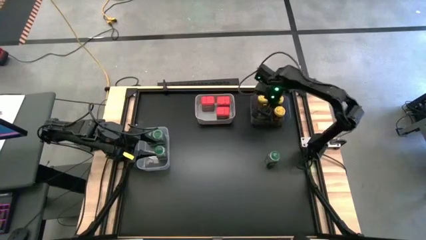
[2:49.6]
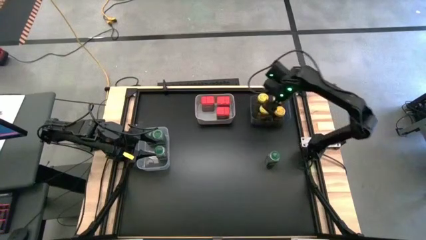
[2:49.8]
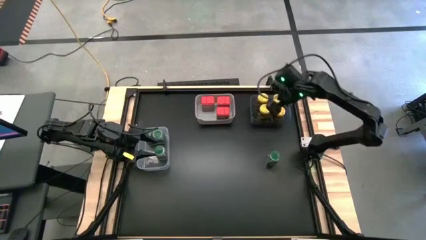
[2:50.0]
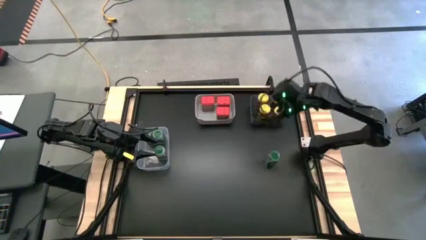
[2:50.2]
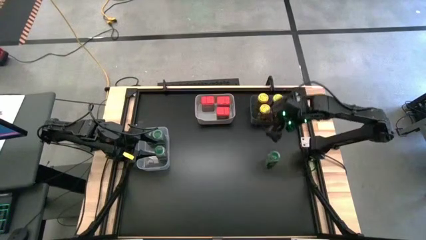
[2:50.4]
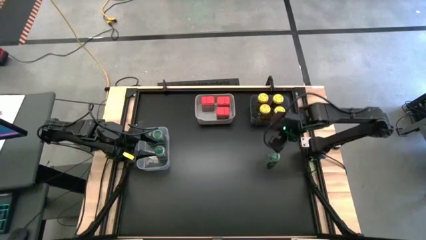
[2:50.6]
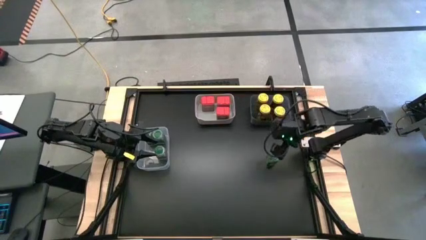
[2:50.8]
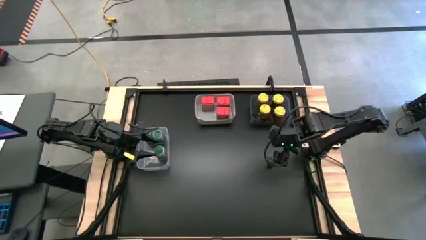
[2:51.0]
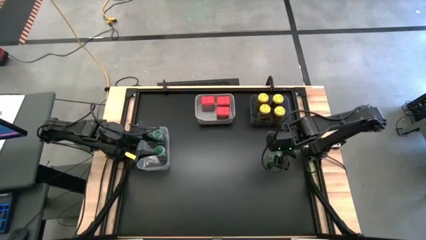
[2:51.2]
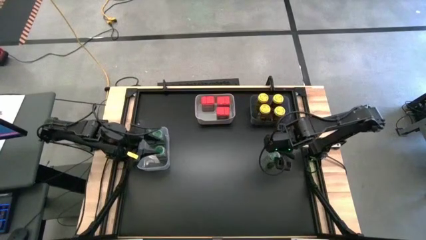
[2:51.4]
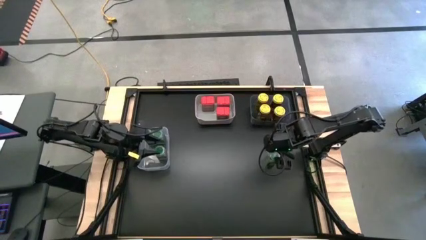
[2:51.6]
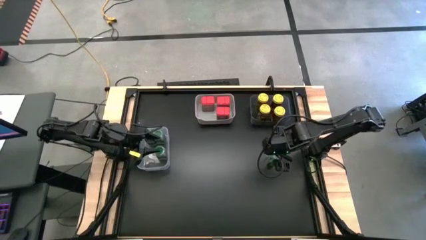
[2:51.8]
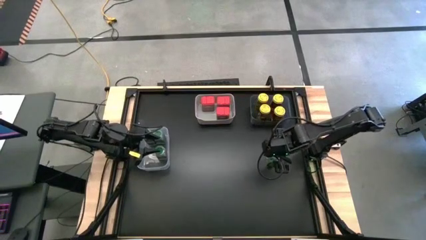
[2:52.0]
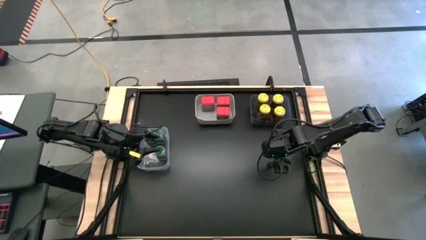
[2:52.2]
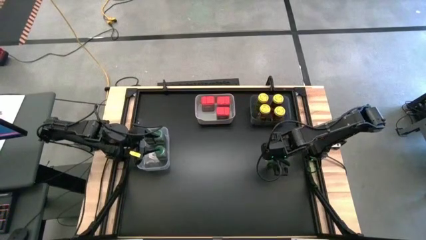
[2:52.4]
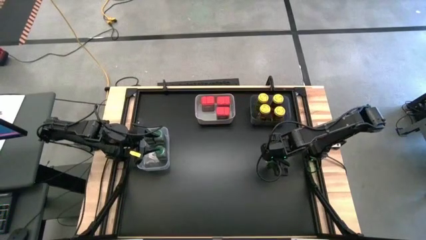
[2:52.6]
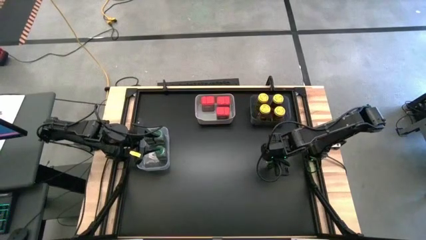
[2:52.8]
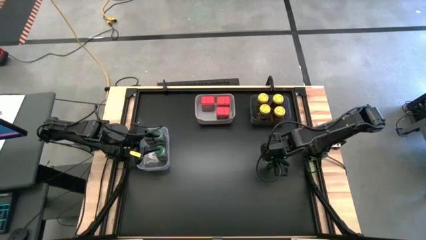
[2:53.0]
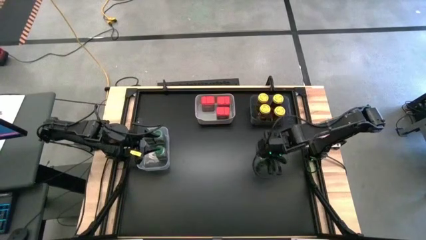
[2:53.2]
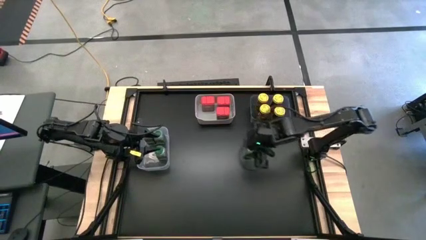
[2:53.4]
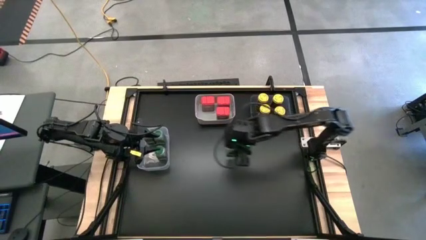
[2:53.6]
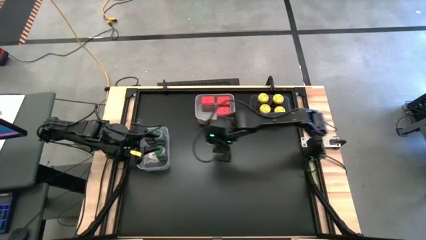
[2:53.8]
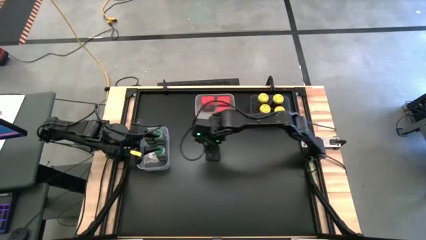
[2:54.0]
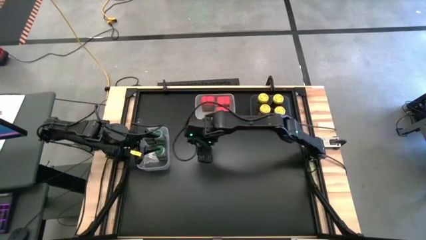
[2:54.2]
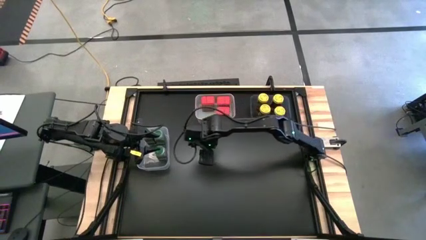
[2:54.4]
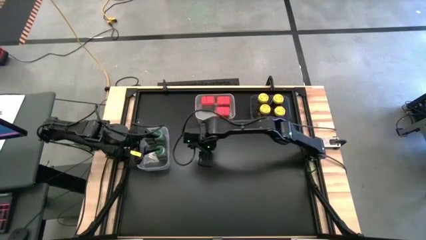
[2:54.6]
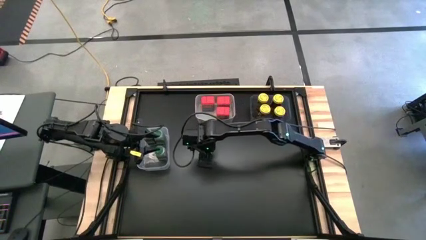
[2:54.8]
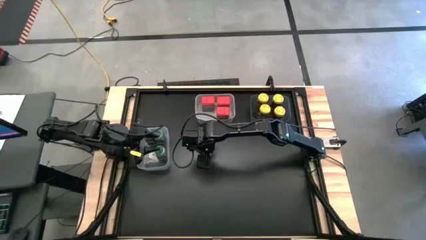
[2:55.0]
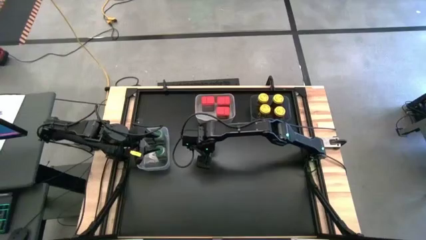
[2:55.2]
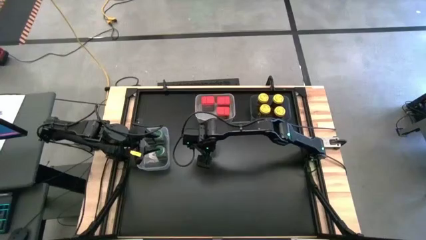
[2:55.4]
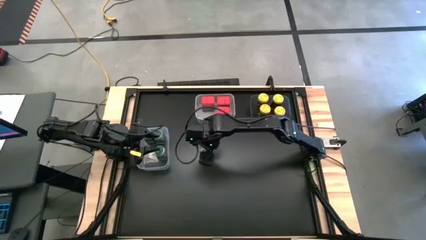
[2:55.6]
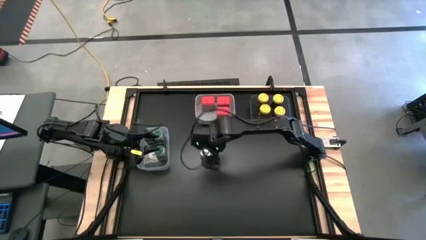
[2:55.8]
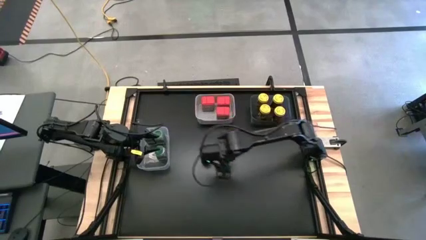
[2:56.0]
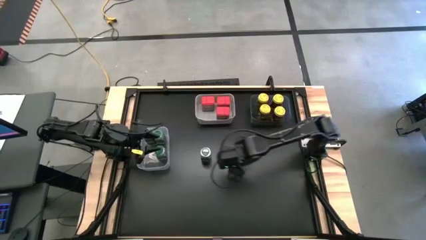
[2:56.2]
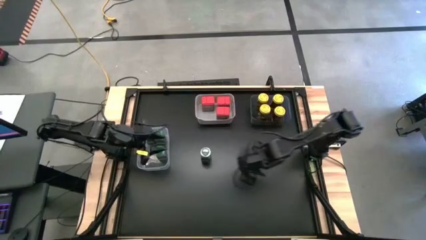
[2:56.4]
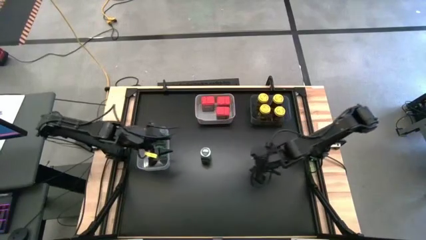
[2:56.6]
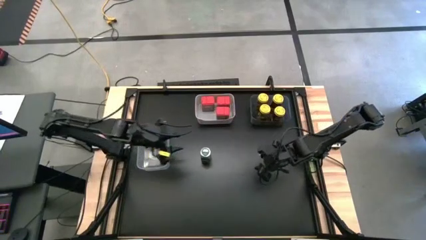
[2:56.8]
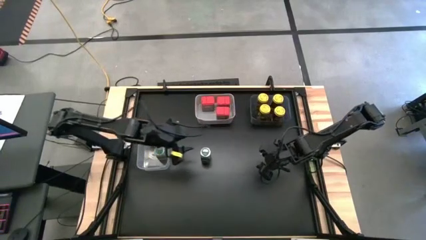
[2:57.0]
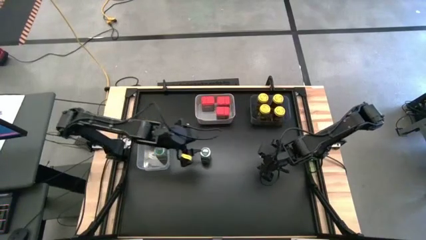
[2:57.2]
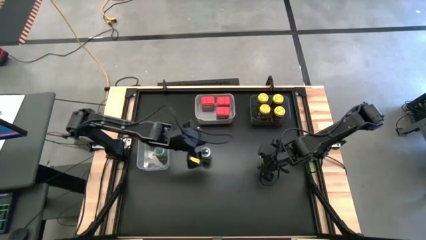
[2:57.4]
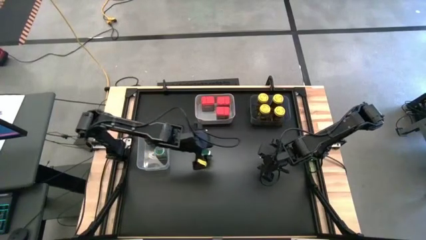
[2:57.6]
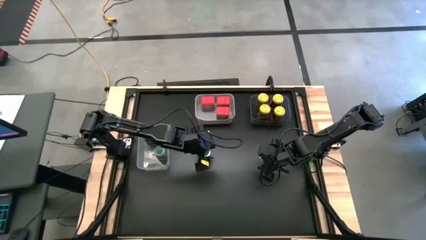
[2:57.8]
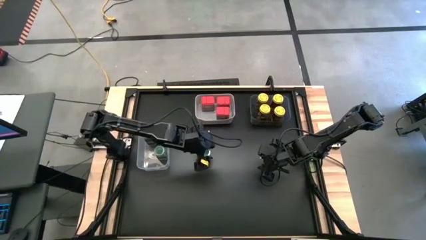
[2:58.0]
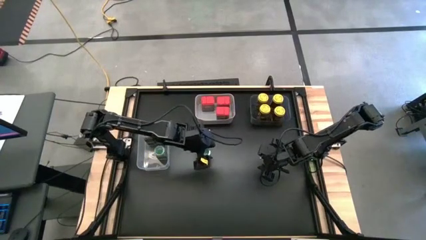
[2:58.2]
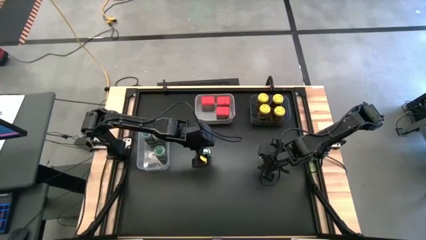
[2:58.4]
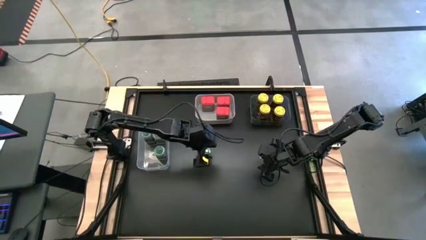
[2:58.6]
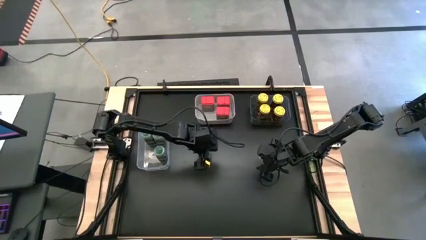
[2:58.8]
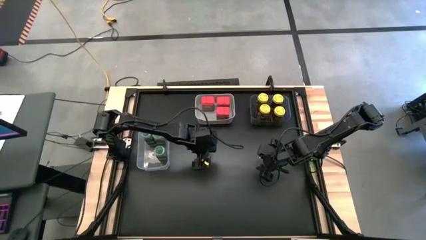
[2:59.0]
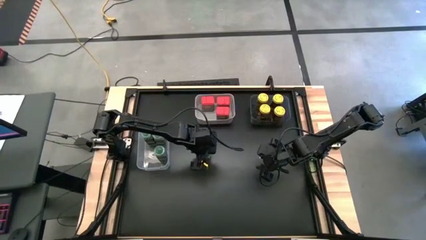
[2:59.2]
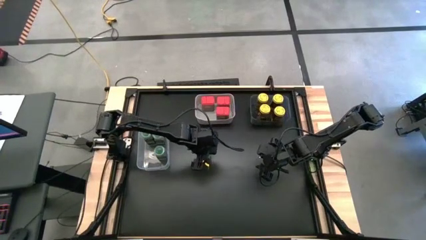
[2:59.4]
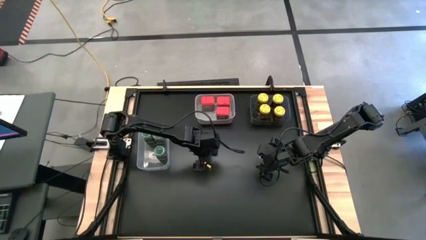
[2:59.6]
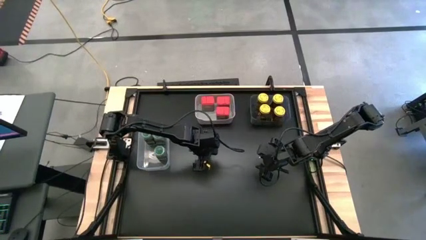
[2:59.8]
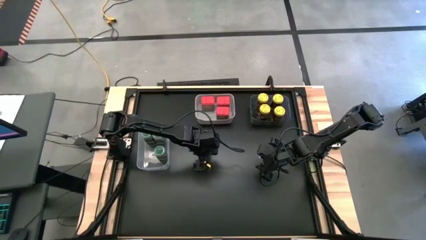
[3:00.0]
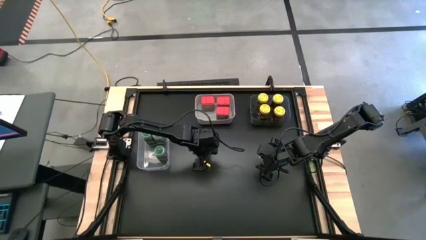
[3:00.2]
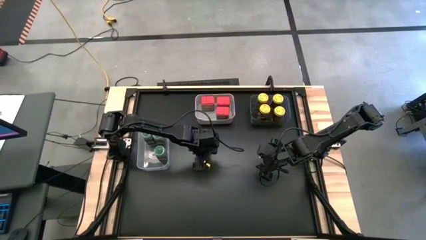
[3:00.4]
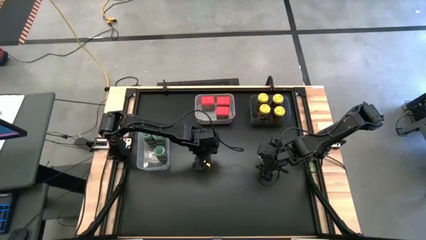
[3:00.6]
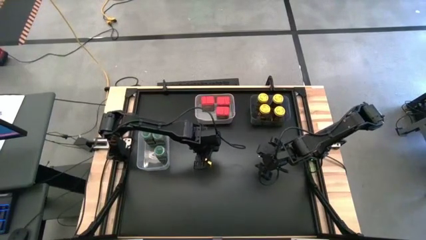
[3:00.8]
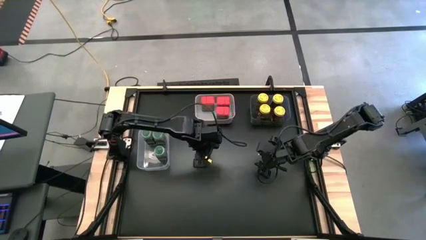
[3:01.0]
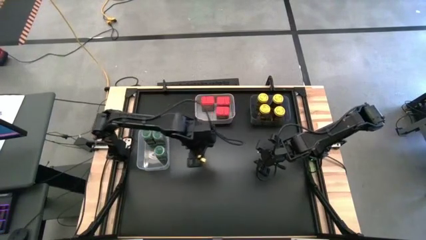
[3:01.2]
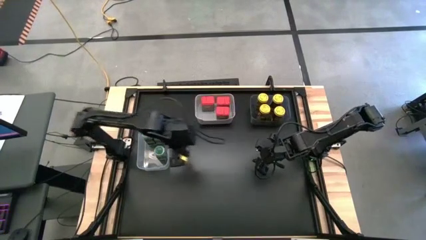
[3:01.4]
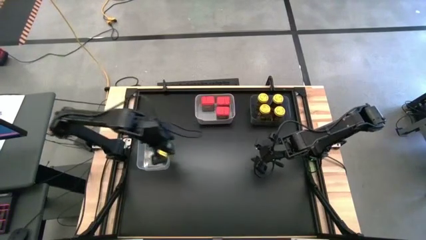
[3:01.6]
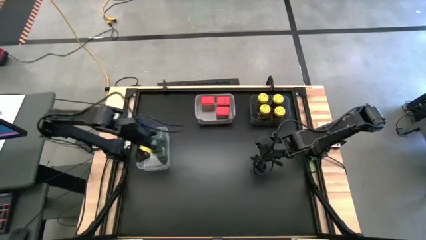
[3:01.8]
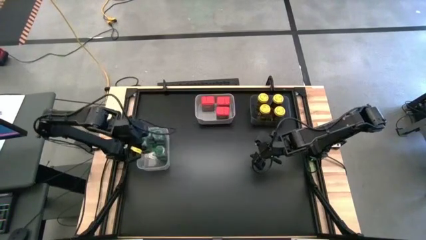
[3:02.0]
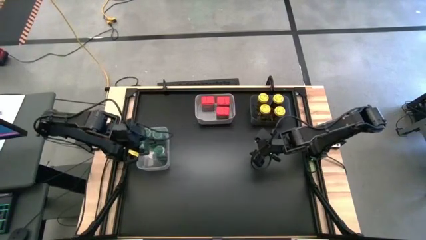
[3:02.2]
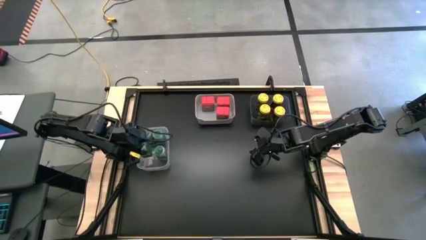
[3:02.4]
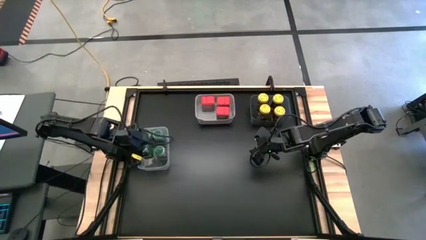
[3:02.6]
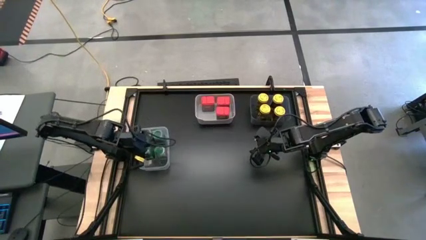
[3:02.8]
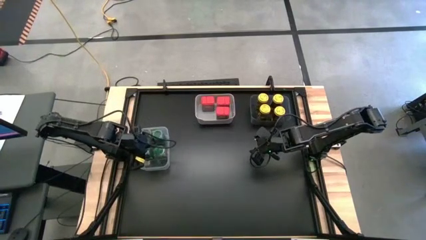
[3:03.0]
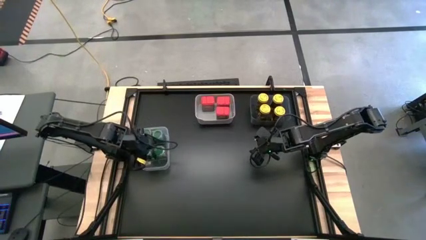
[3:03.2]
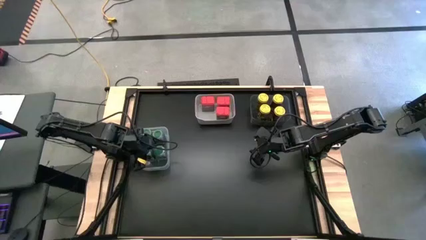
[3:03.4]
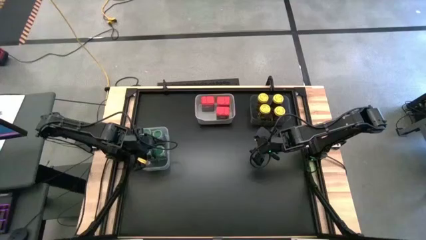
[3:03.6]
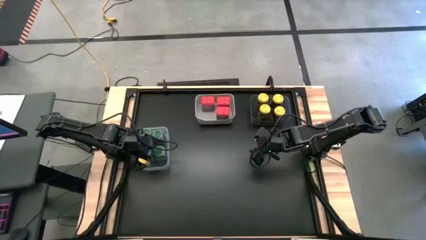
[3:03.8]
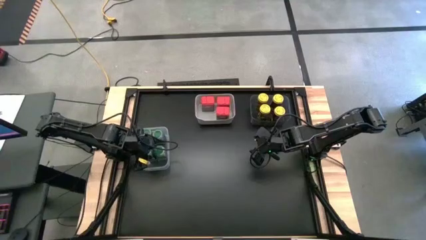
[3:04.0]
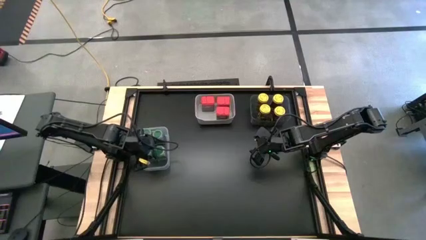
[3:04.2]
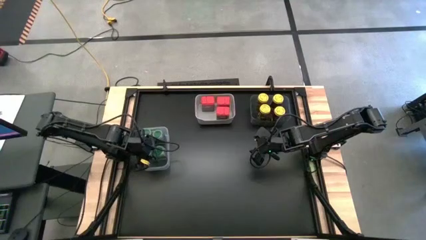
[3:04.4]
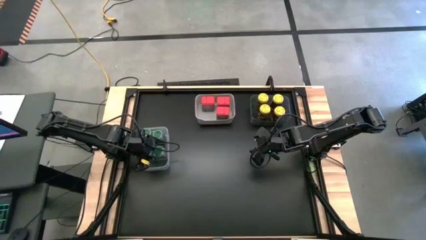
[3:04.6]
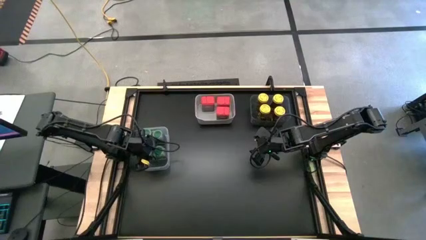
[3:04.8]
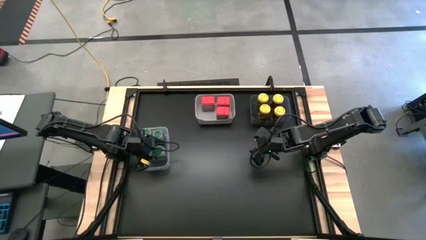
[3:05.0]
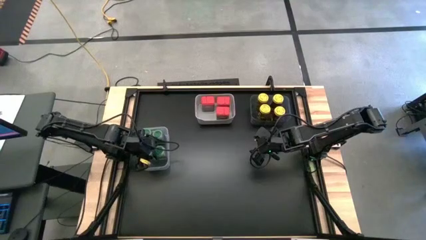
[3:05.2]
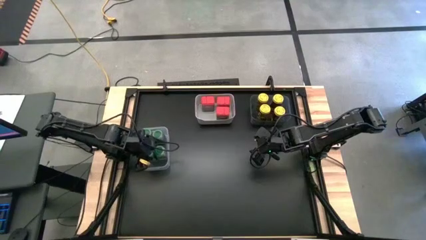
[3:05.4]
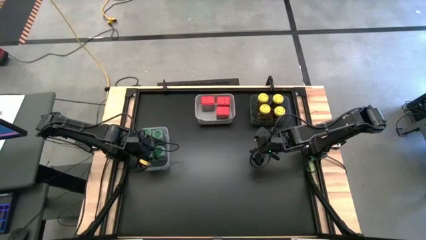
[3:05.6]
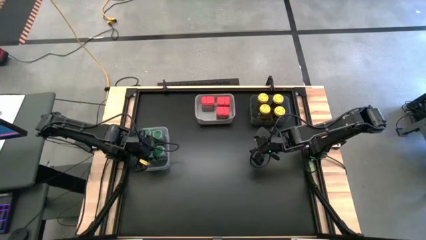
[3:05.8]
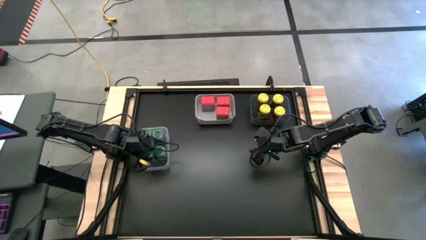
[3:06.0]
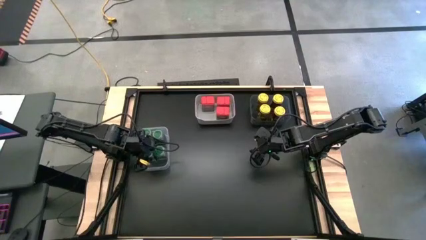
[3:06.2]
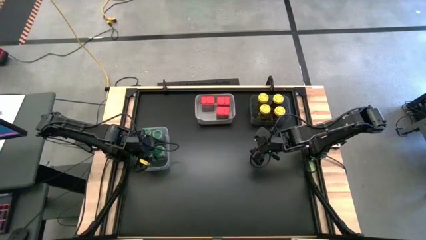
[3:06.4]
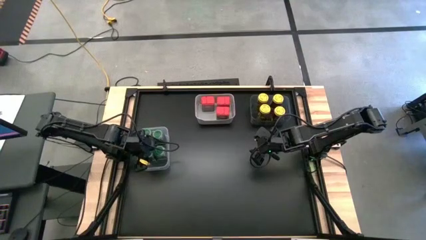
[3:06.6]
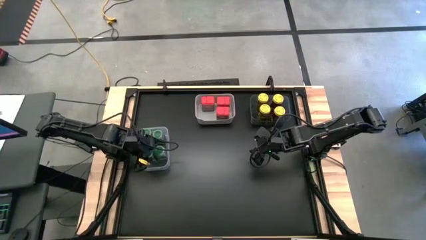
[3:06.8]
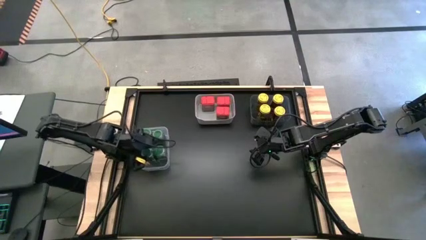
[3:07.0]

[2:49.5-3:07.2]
Task: Sort spices by type
Put the green seasoning bottle into the transparent bin
